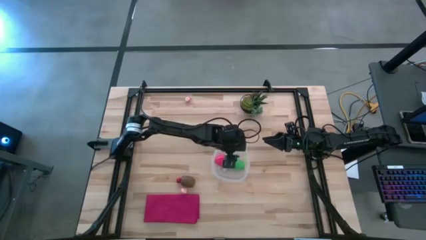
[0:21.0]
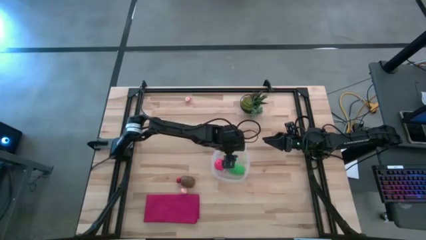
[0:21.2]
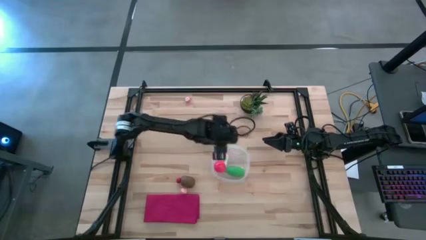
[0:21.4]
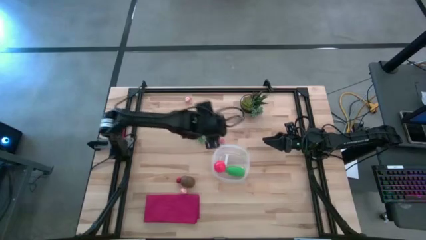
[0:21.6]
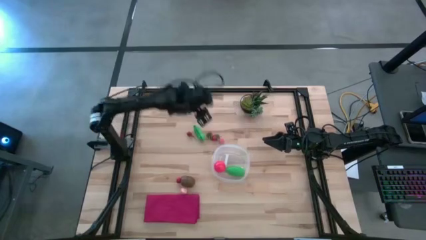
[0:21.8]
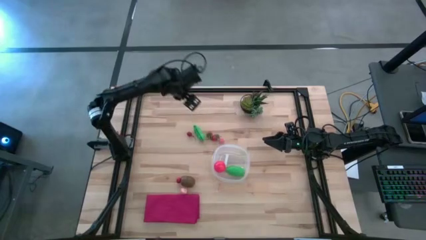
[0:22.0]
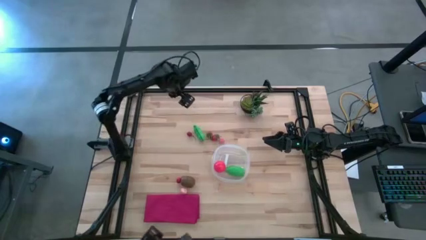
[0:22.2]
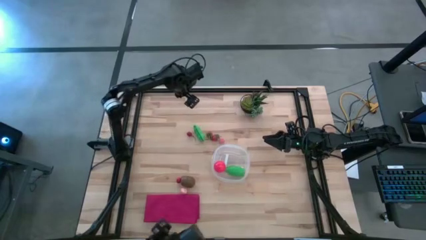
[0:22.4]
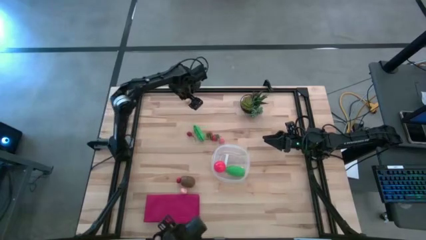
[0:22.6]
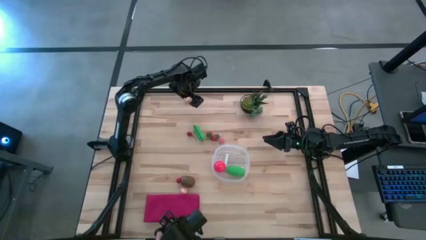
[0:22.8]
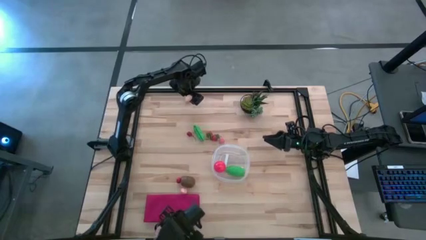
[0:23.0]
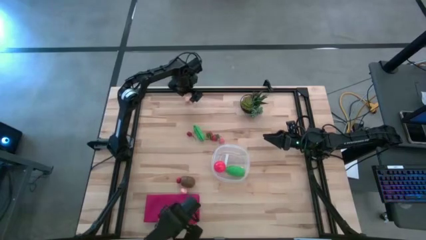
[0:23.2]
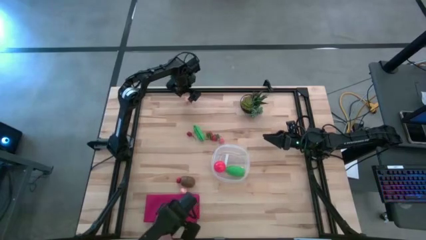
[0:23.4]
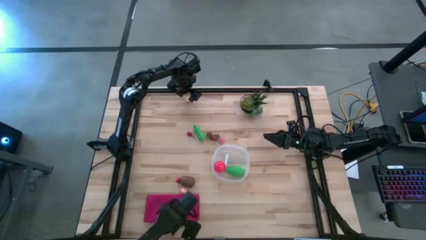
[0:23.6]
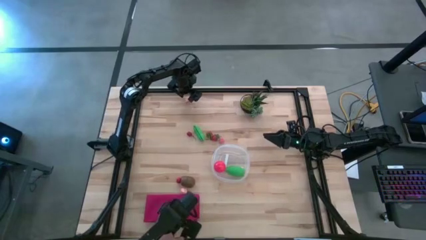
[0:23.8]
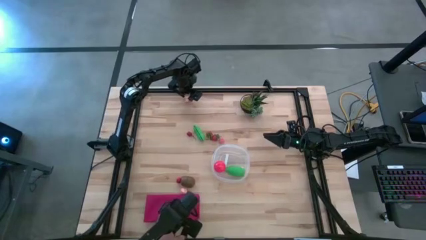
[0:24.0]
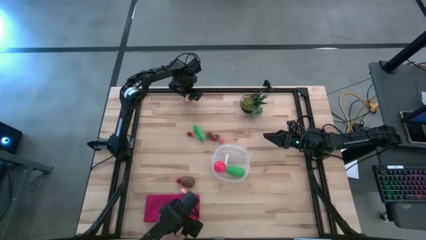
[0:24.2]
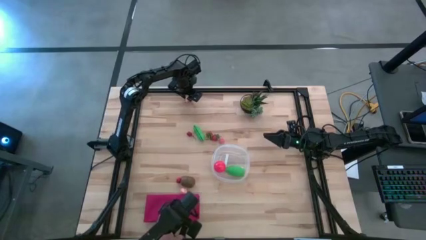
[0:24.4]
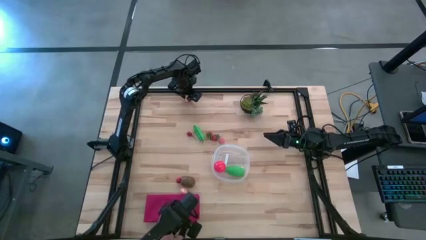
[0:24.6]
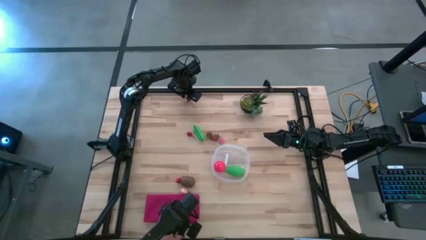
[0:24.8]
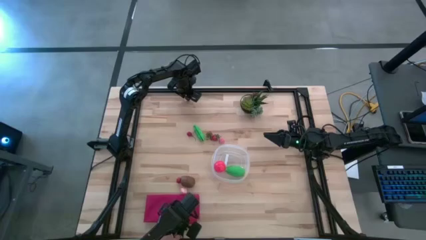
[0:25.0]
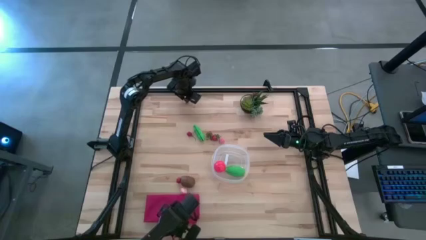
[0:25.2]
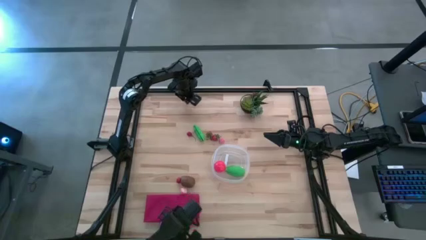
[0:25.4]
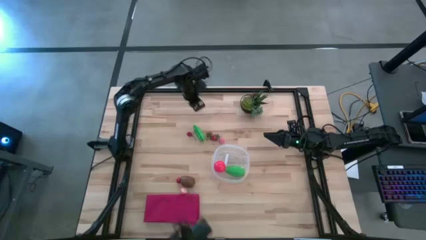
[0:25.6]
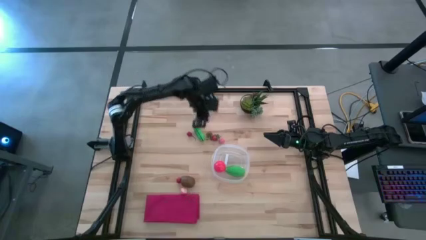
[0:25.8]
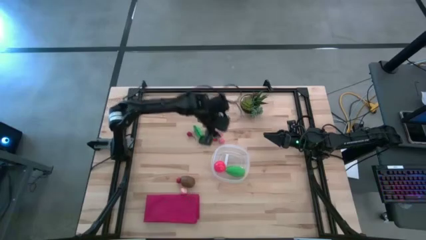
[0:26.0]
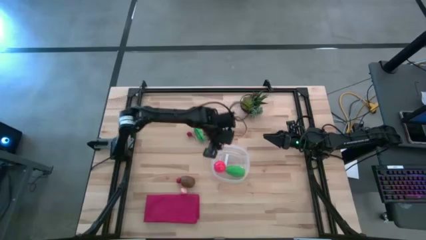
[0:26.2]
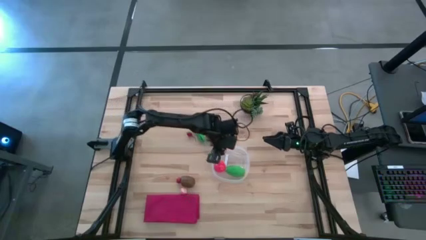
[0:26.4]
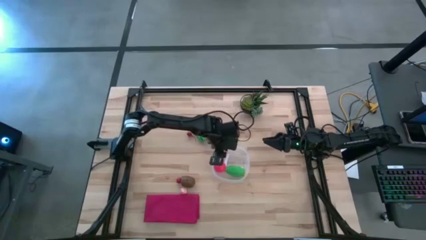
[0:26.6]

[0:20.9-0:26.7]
Task: Pick and placing Produce into tupperware
Put the top peach into the transparent container

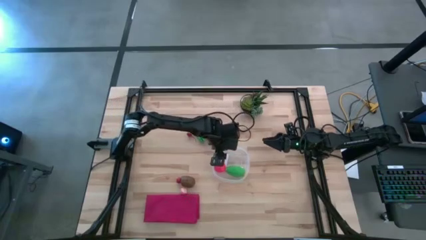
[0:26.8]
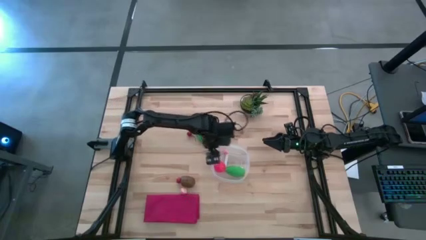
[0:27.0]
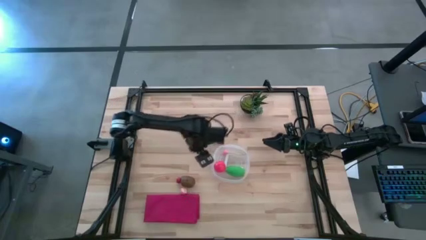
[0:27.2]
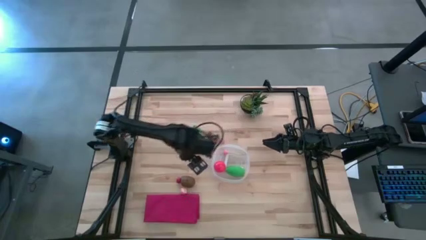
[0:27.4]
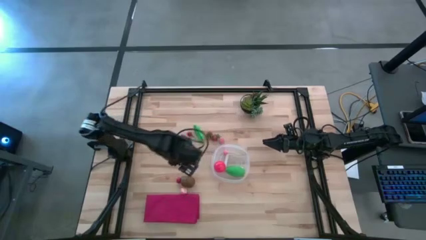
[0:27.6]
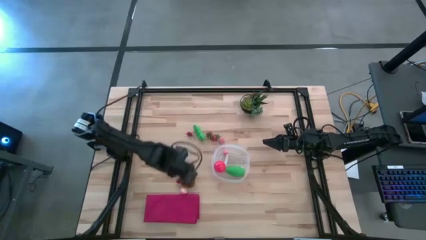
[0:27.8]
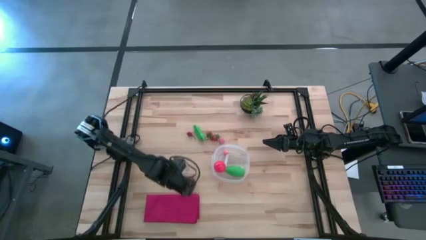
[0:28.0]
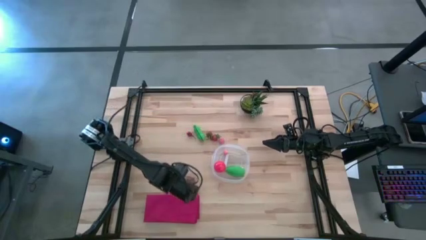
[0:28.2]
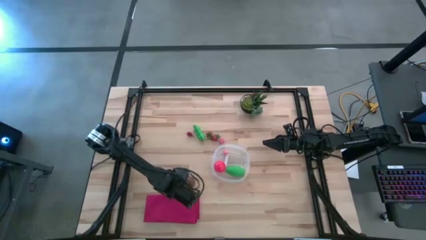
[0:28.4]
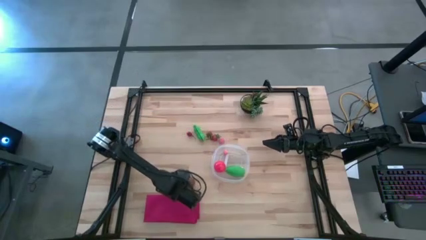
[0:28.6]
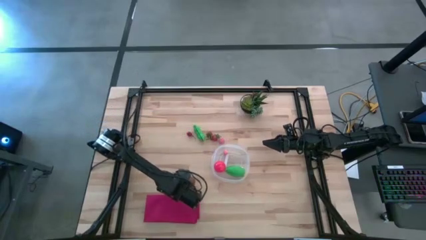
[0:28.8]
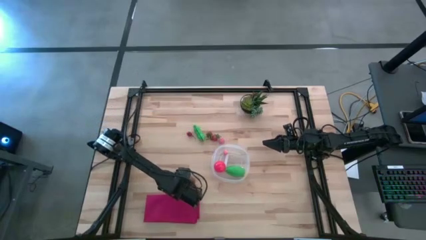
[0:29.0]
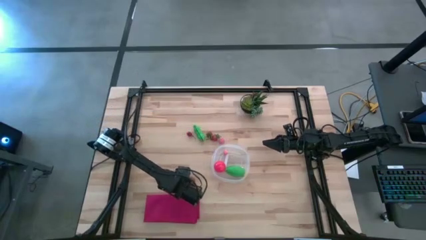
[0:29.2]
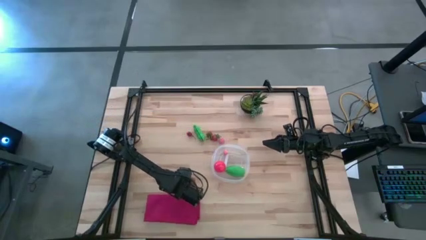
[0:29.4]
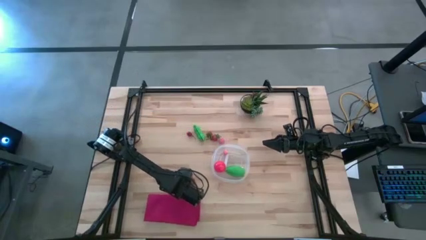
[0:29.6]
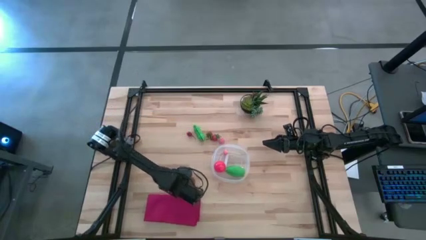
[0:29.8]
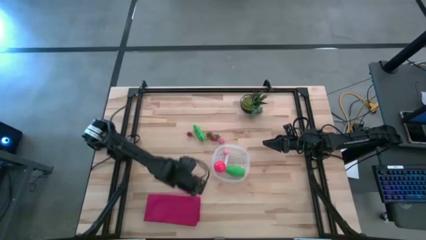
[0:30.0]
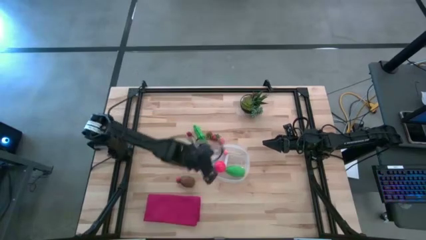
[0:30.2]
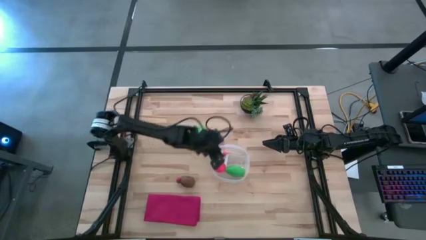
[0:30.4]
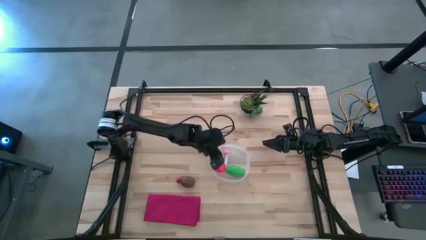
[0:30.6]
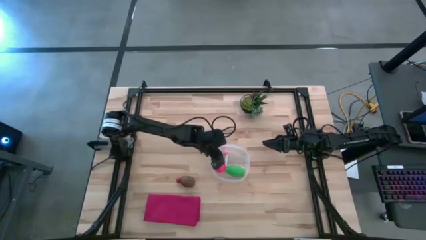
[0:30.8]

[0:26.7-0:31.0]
Put the bottom peach into the transparent container

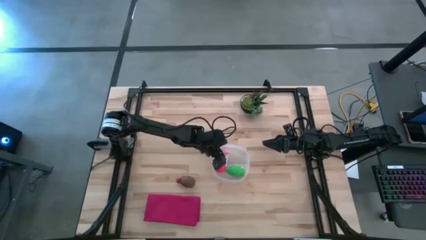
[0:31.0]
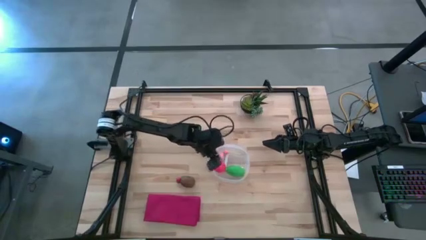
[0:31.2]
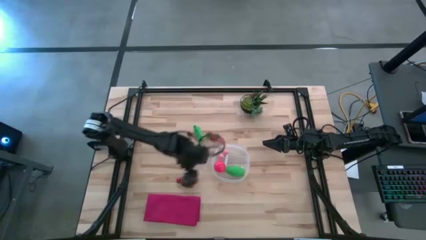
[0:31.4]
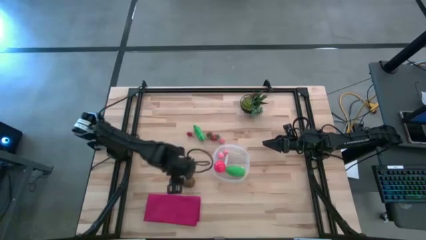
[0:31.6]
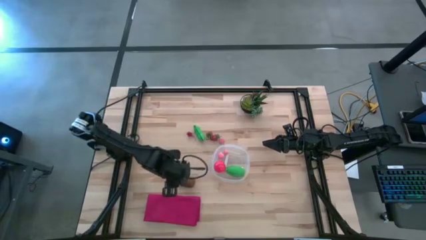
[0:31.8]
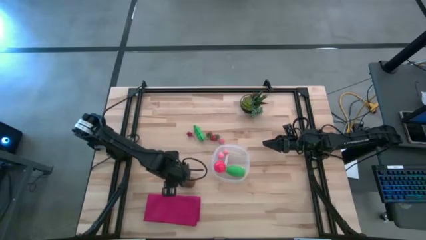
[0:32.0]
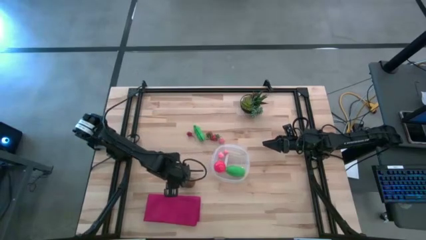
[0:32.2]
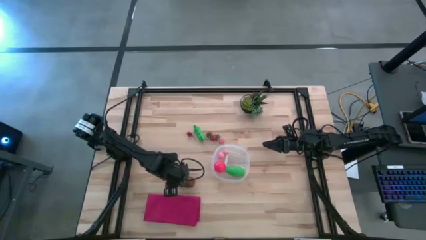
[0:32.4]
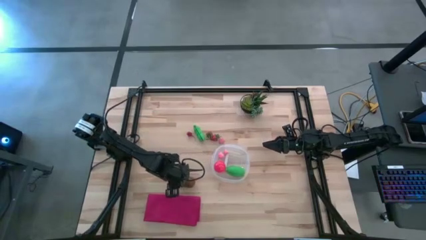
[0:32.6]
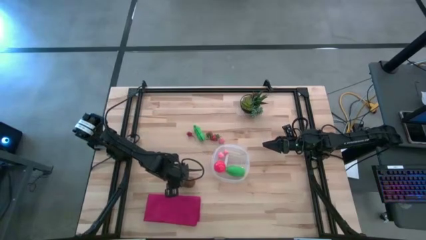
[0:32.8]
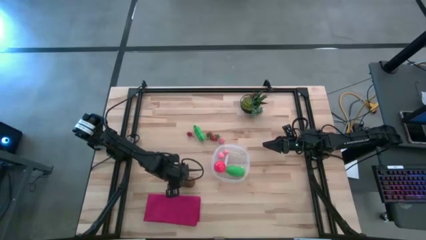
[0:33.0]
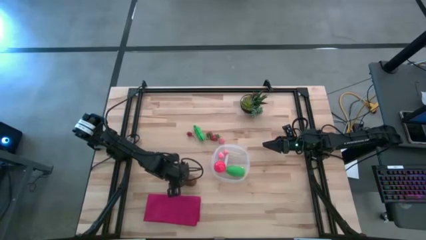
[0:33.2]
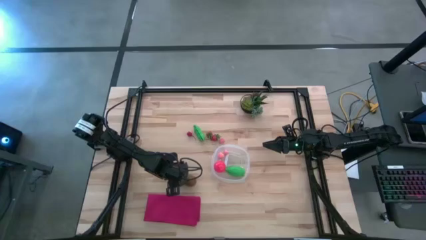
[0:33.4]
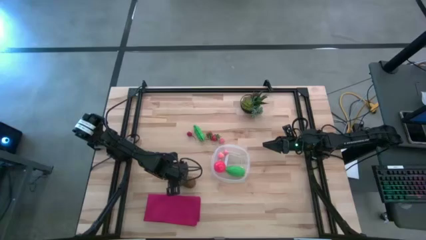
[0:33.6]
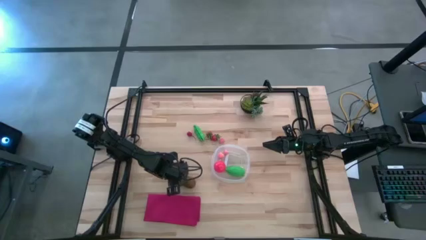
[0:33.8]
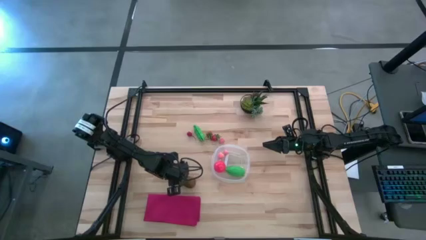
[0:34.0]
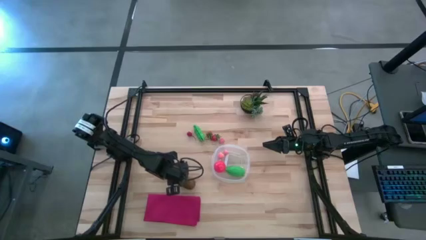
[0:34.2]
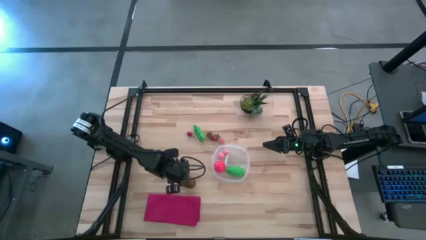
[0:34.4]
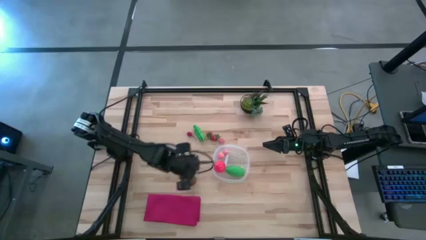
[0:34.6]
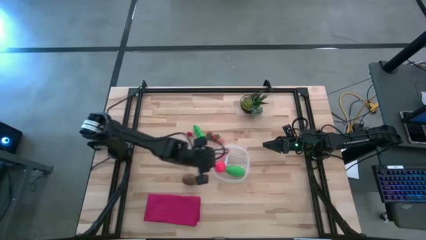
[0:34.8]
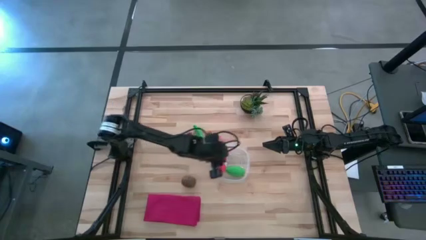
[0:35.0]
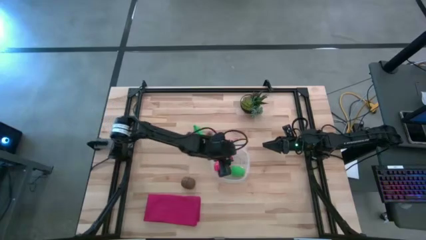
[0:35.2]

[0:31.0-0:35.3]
Put the bottom cherry into the transparent container
